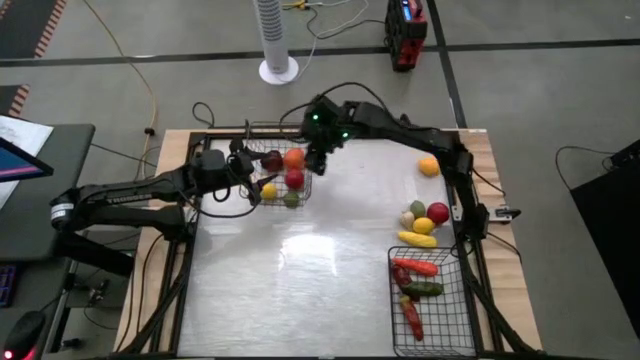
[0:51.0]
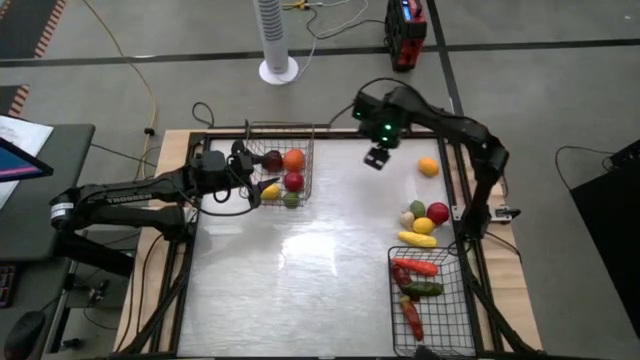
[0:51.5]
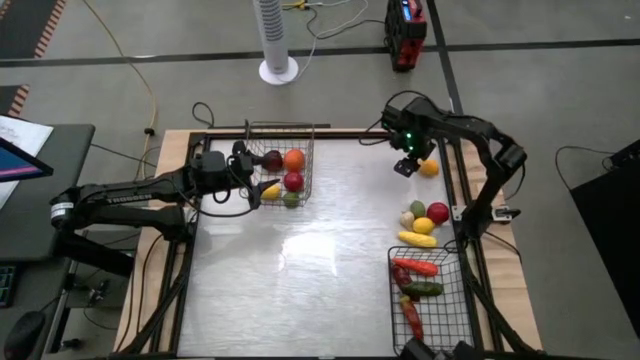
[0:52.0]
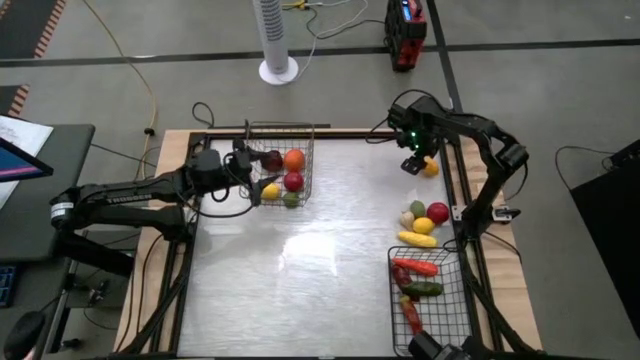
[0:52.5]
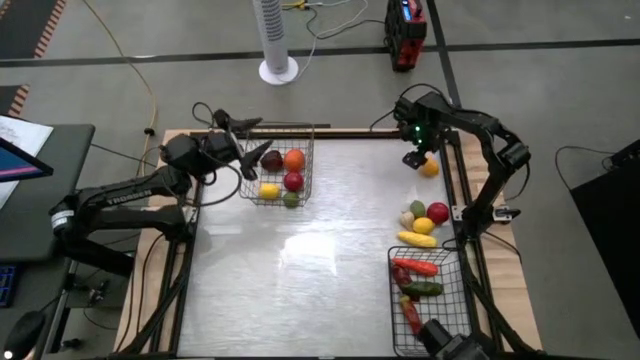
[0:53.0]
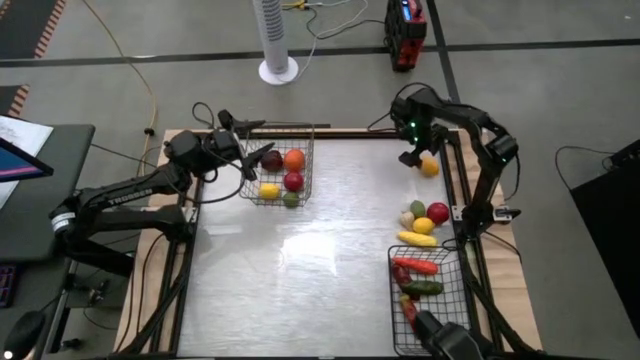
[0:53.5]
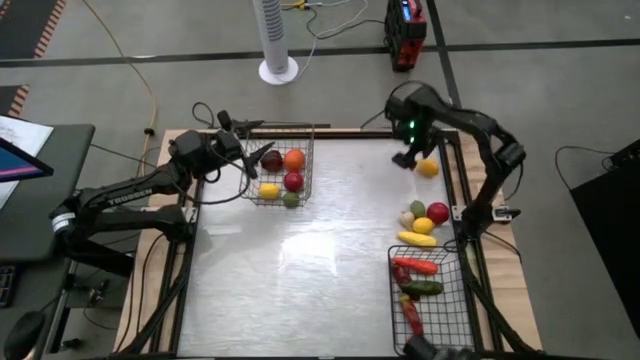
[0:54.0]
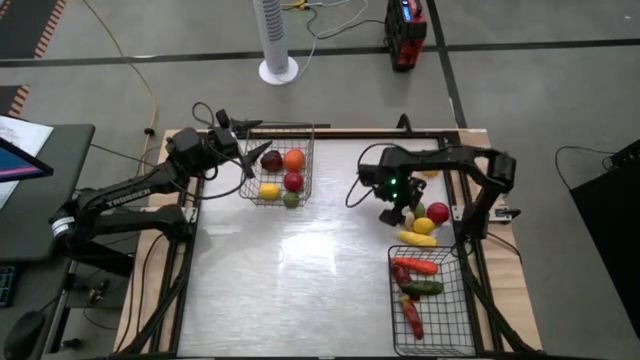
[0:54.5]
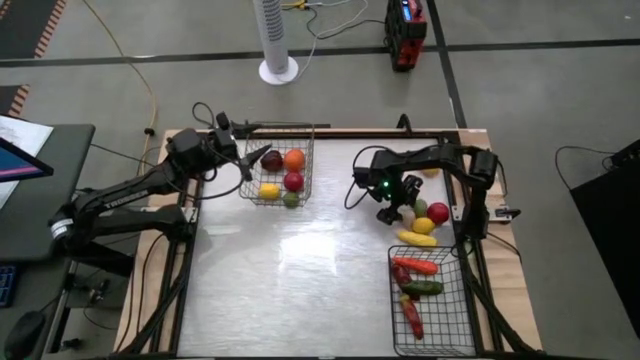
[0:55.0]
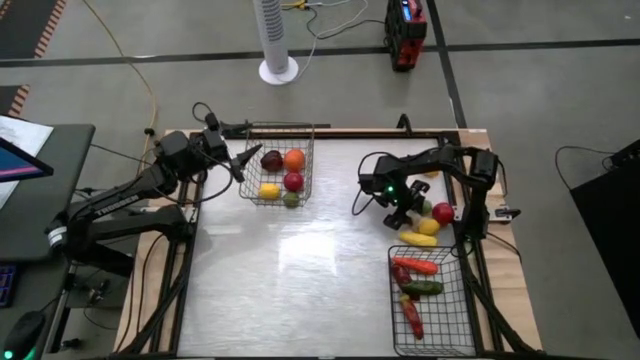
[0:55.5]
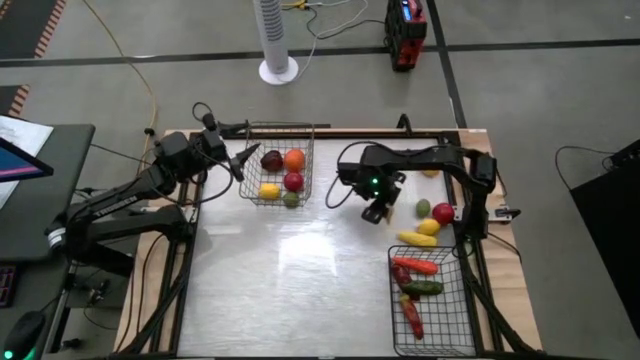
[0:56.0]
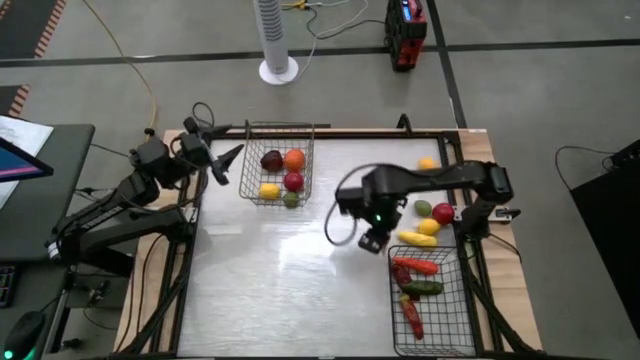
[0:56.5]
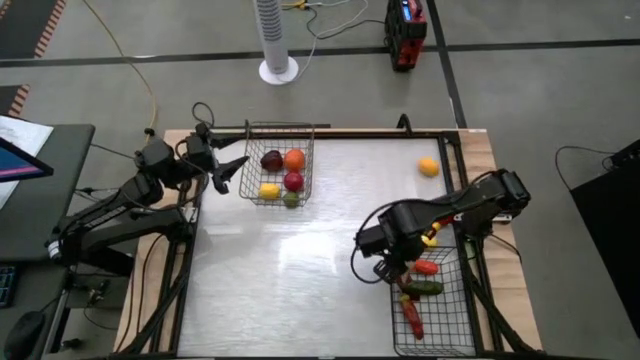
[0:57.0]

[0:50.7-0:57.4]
Task: Sort produce into baskets
Put the garlic into the right wire basket

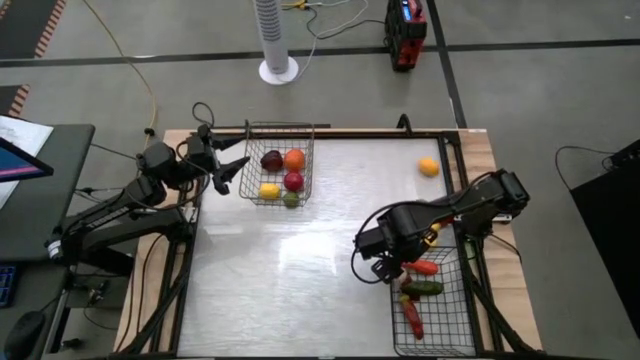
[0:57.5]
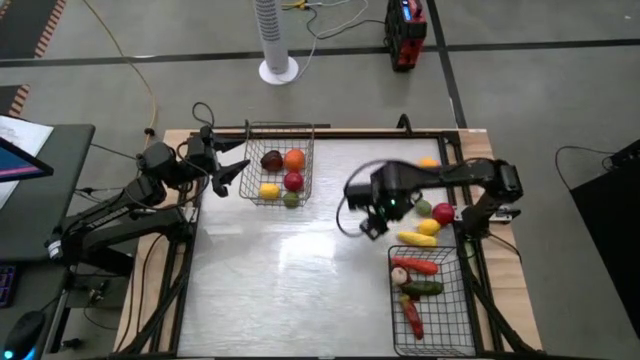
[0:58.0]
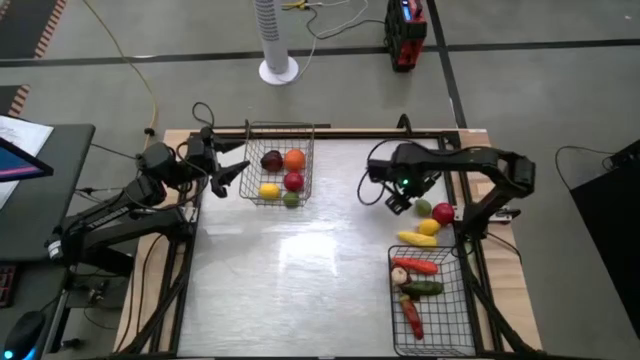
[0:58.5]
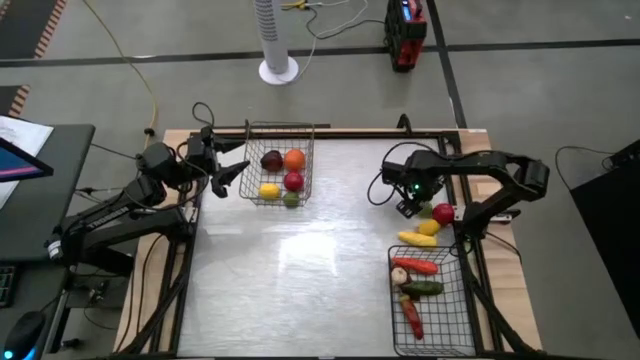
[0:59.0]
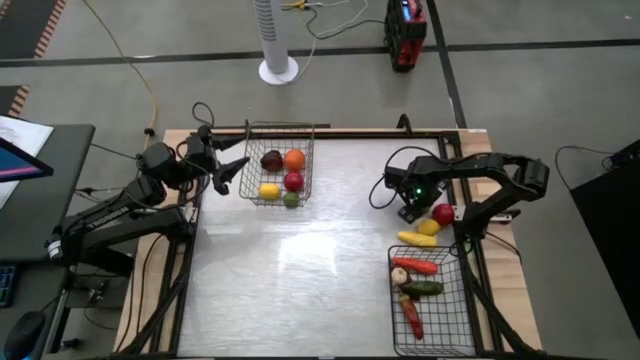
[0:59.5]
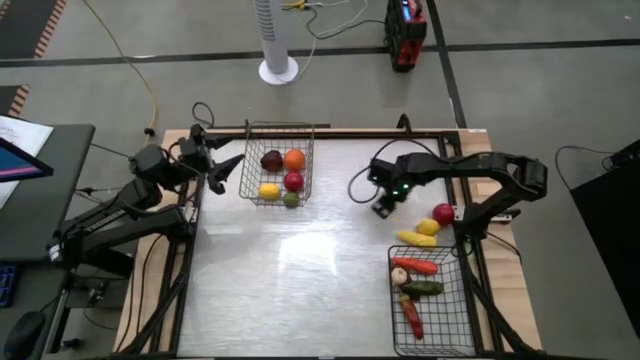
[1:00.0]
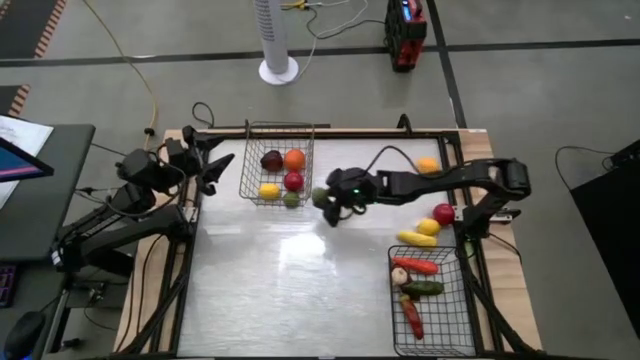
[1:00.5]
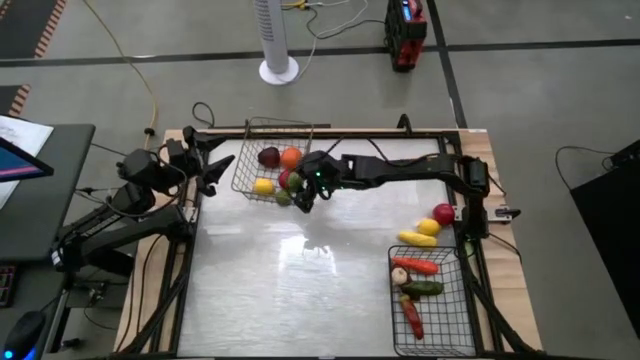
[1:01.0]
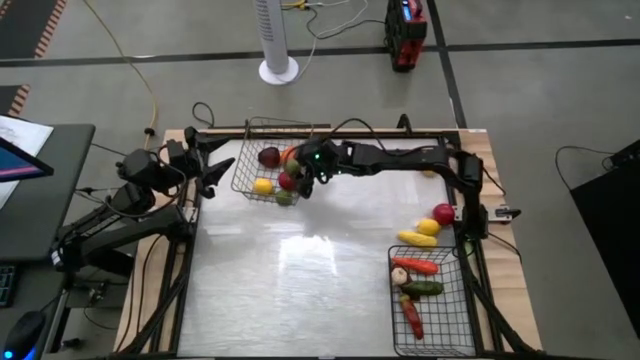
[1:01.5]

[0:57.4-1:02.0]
Put the green citrus into the left wire basket

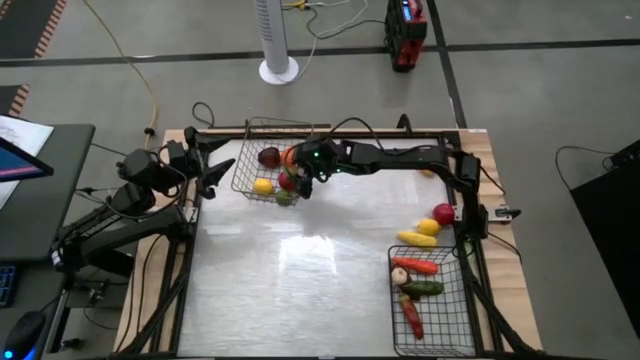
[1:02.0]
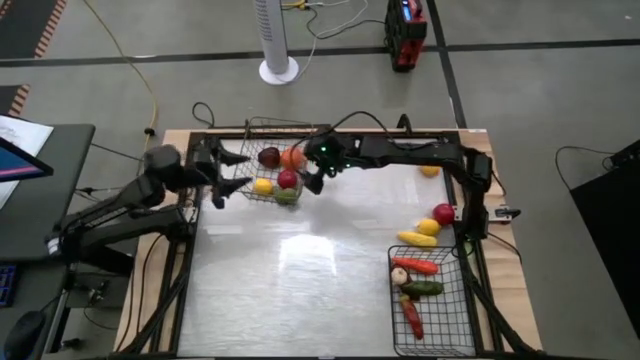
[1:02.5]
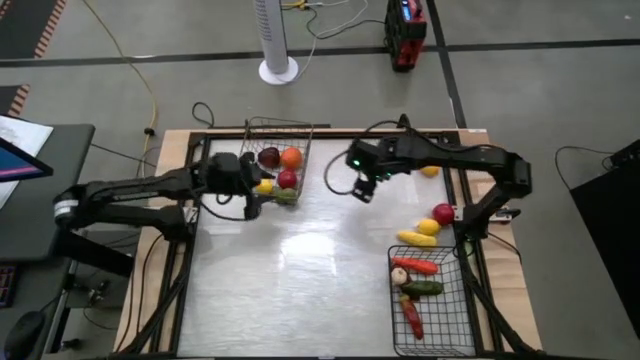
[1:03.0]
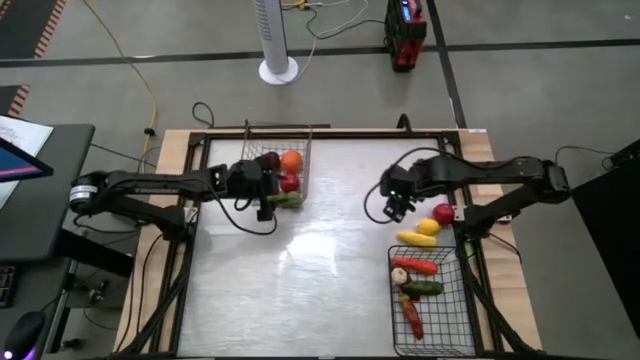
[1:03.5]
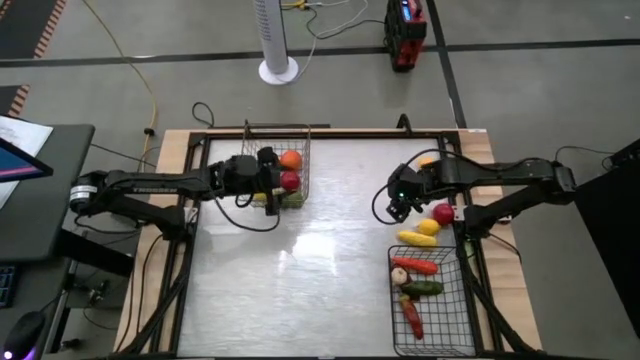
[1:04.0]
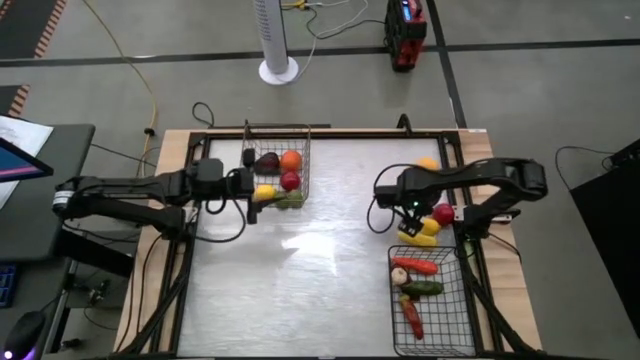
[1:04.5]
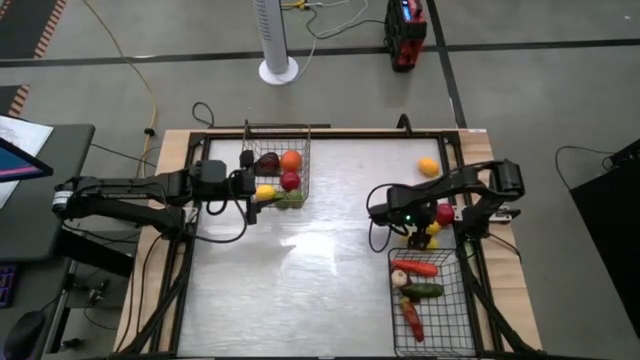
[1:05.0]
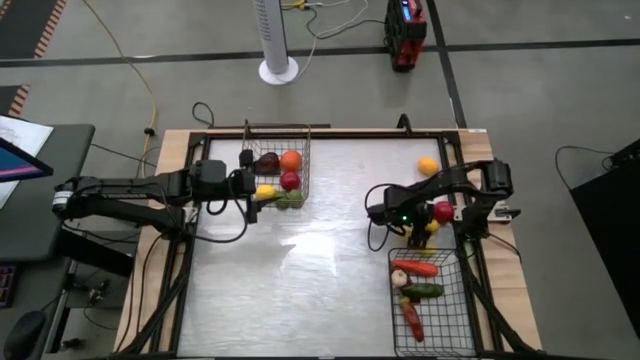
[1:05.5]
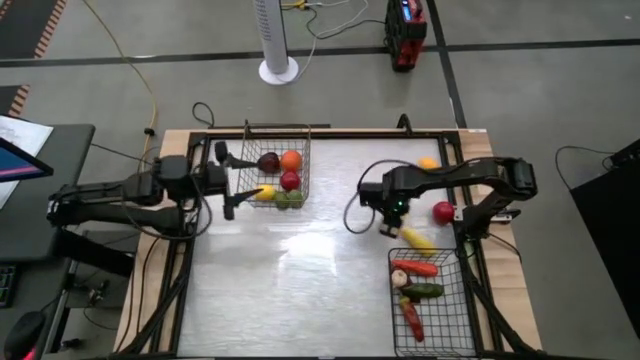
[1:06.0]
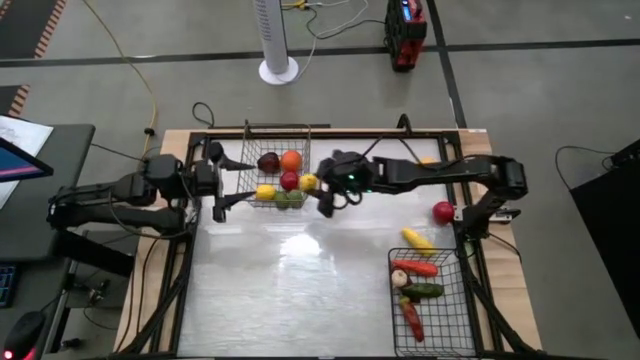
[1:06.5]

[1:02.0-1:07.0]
Put the bottom lemon into the left wire basket

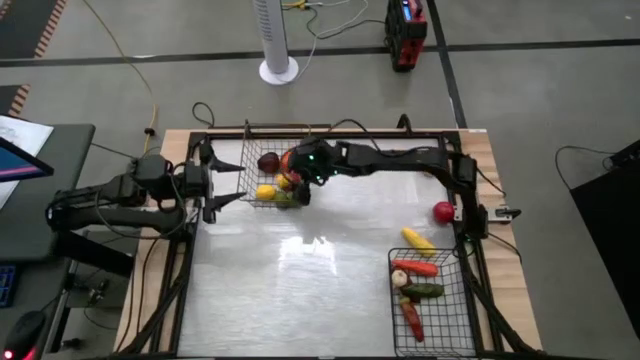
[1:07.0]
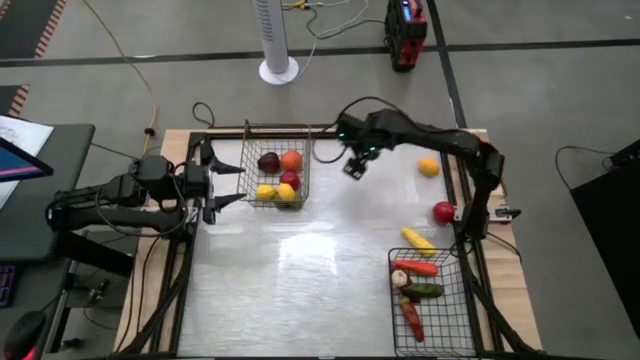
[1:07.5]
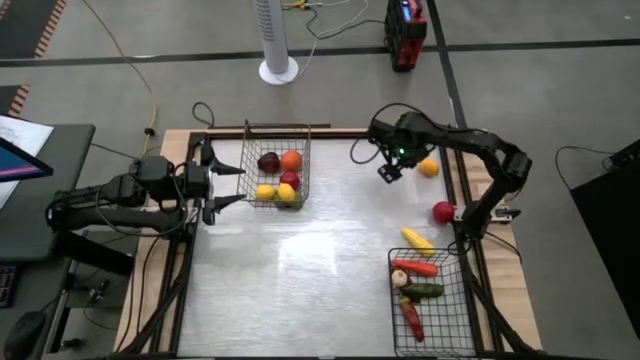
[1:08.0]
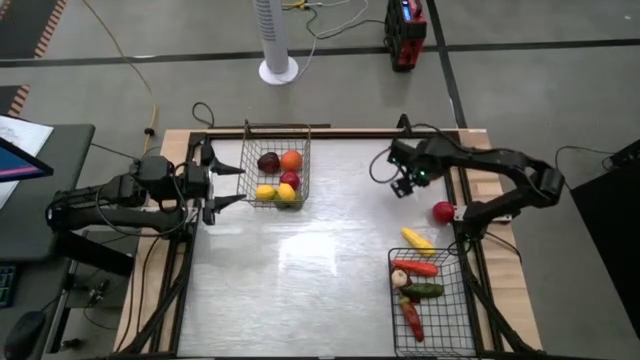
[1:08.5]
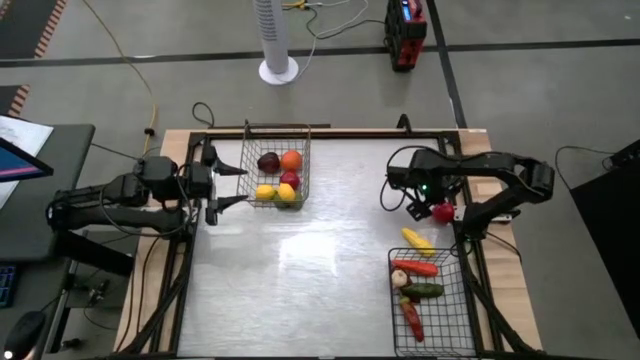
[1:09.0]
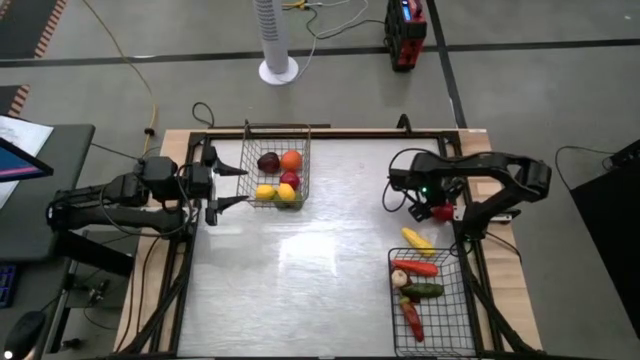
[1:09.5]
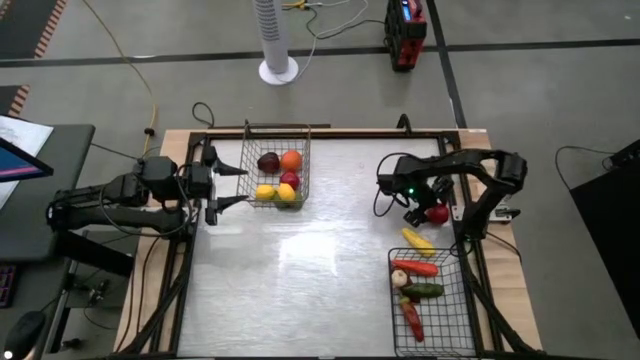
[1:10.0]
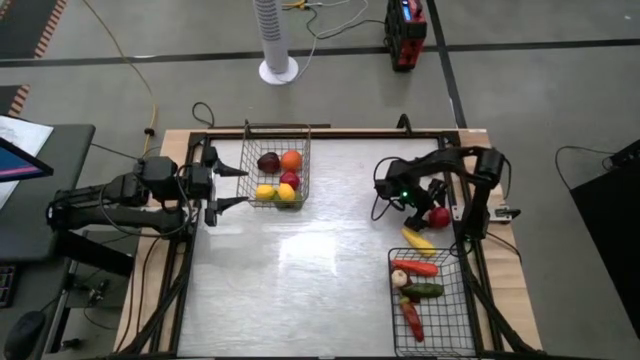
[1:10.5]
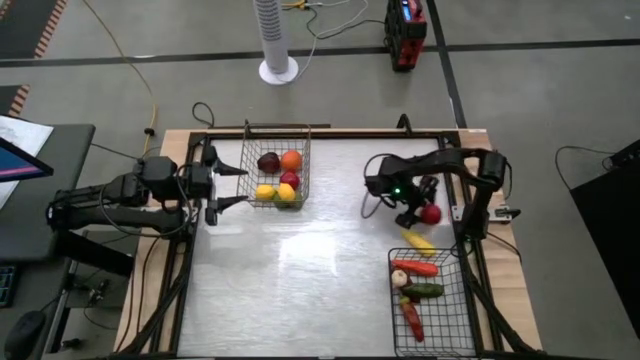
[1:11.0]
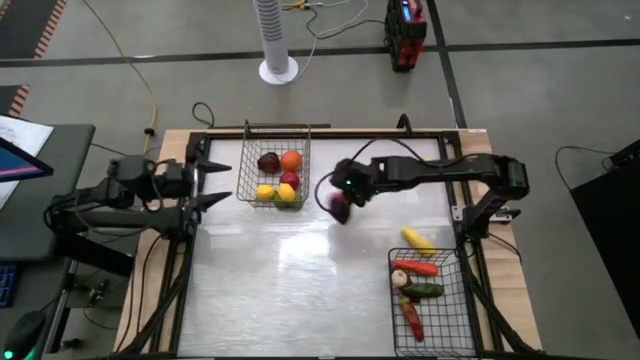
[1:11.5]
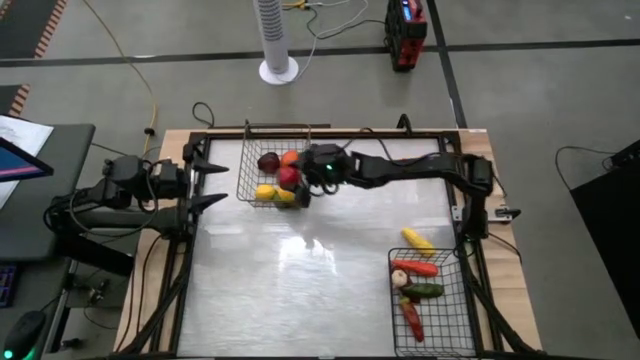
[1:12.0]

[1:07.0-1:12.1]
Put the tomato into the left wire basket
